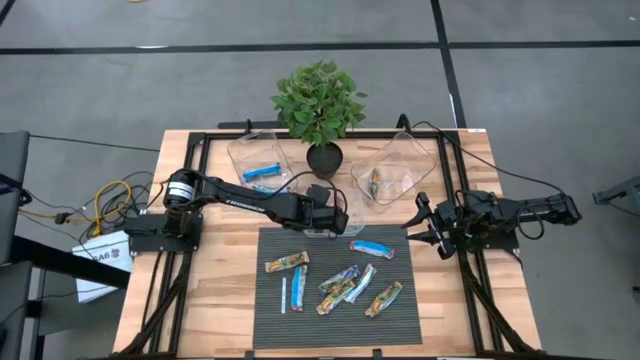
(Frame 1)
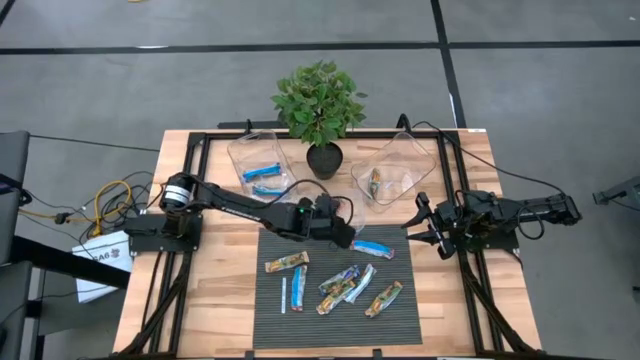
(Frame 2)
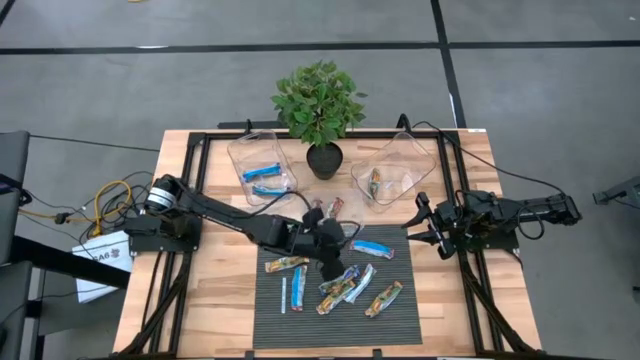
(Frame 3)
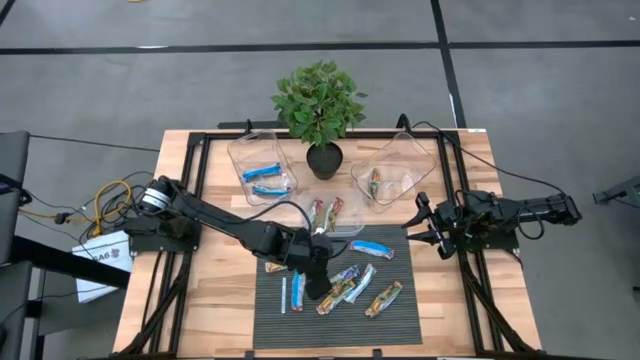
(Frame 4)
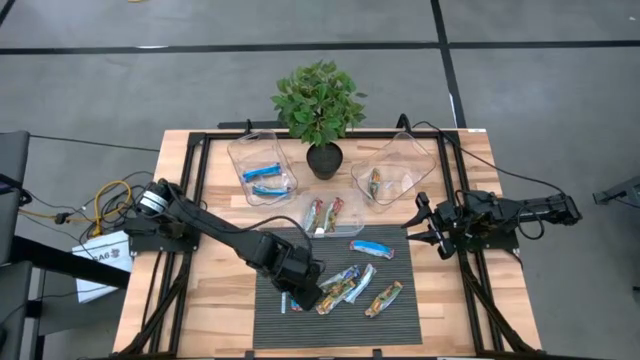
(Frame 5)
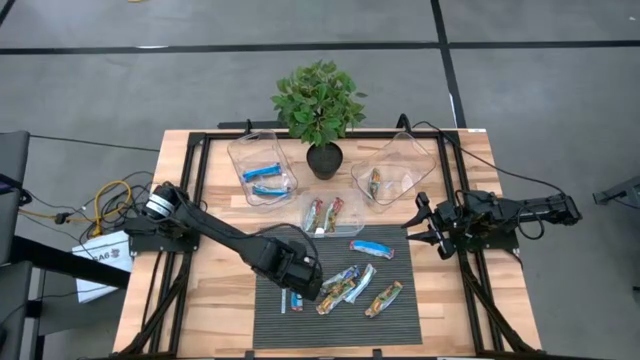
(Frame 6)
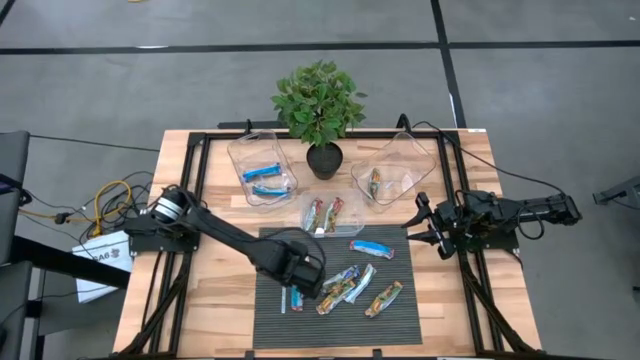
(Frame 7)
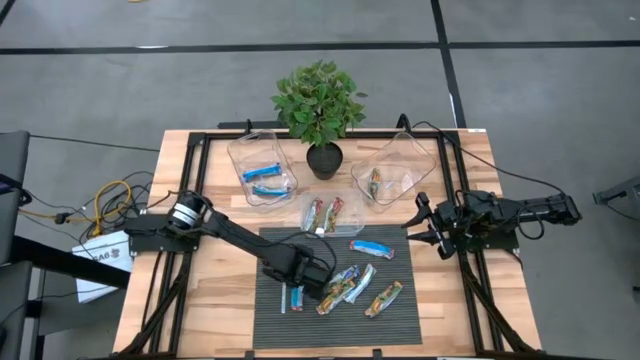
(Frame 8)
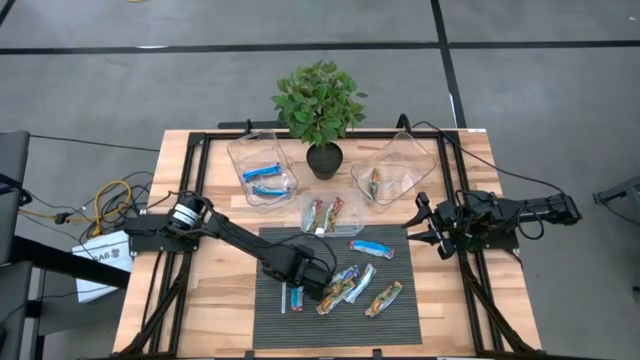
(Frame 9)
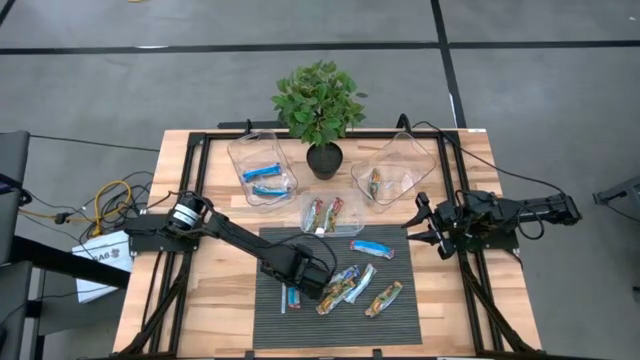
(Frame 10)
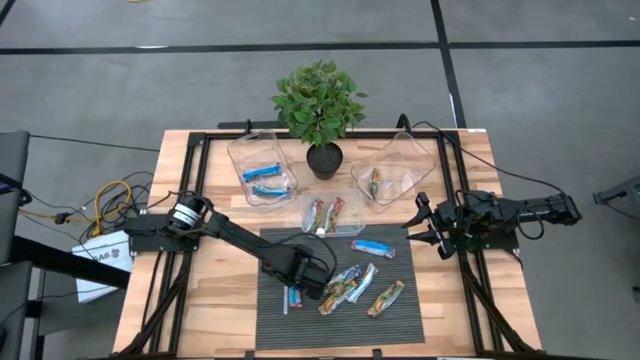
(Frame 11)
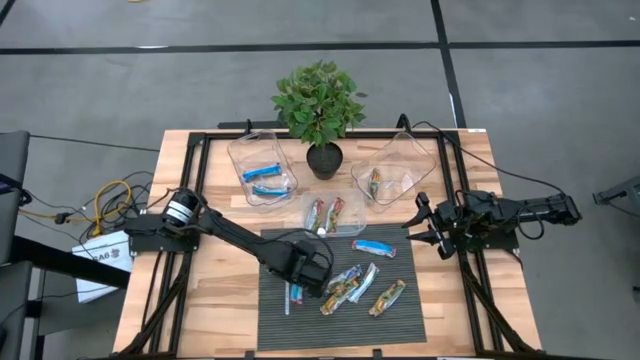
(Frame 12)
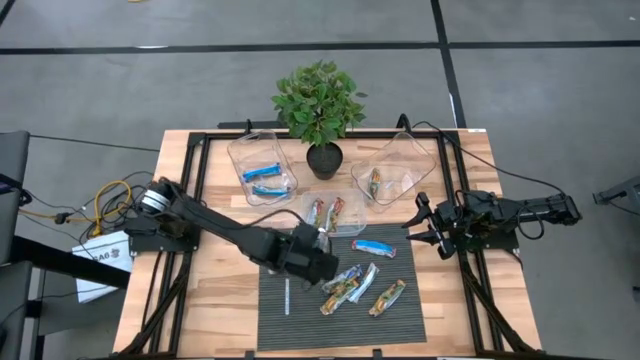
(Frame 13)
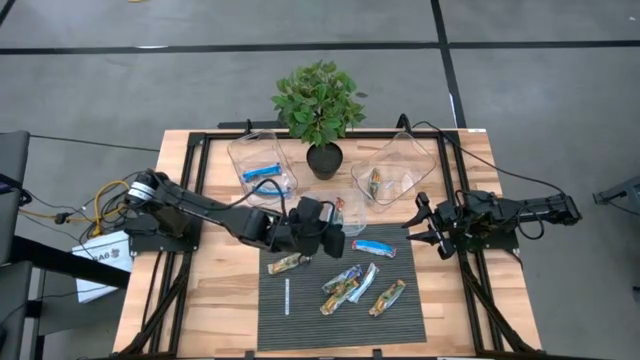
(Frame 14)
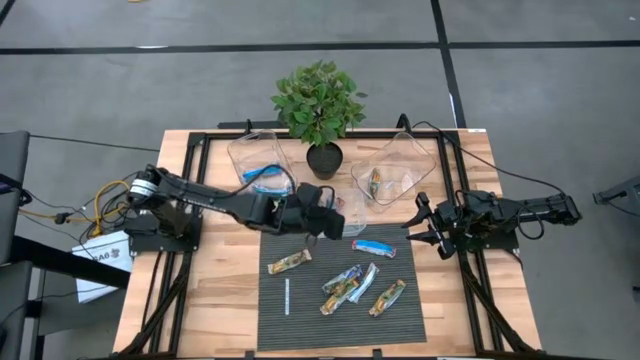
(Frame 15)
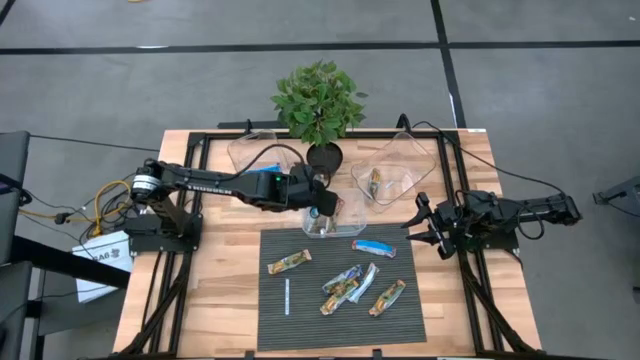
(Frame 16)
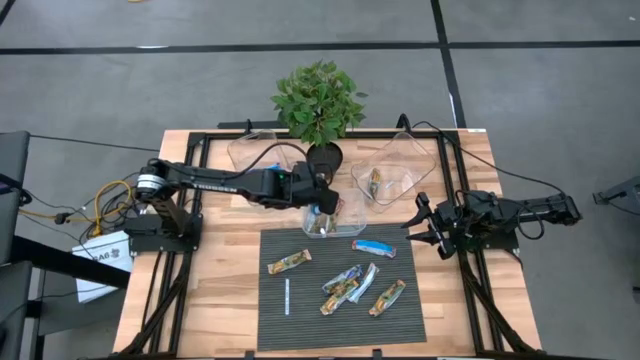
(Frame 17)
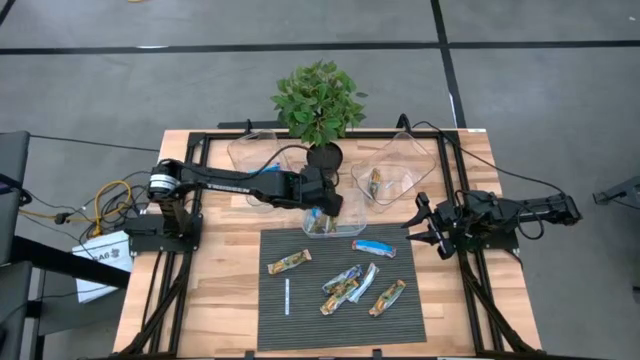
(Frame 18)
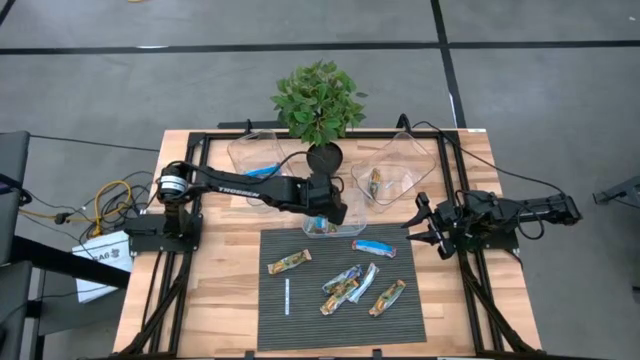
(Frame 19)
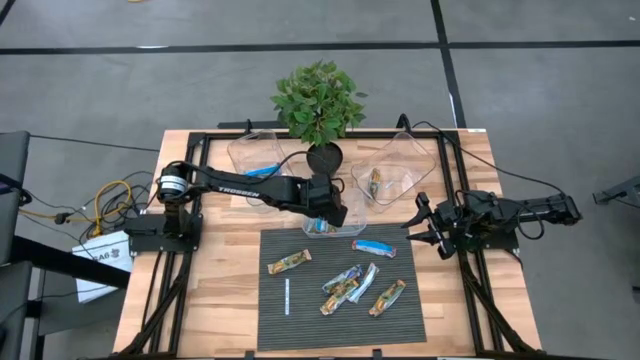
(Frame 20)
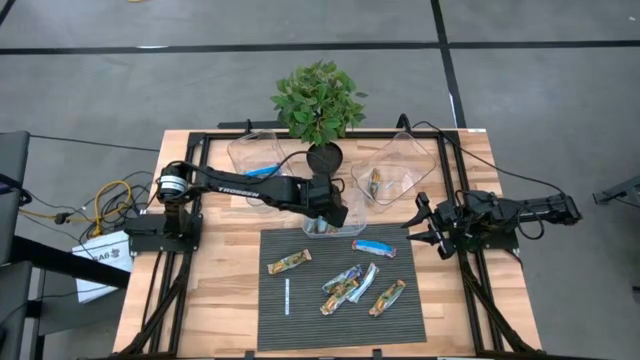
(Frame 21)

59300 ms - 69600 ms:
Task: Pick and place Granola Bars by type
Put the red granola bar into the center transparent bin

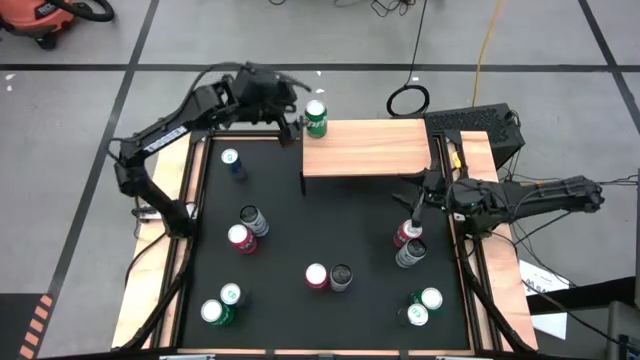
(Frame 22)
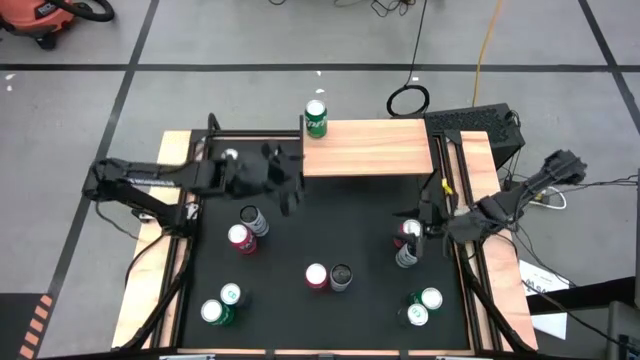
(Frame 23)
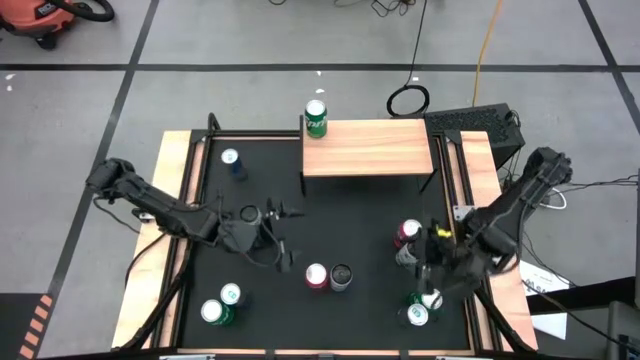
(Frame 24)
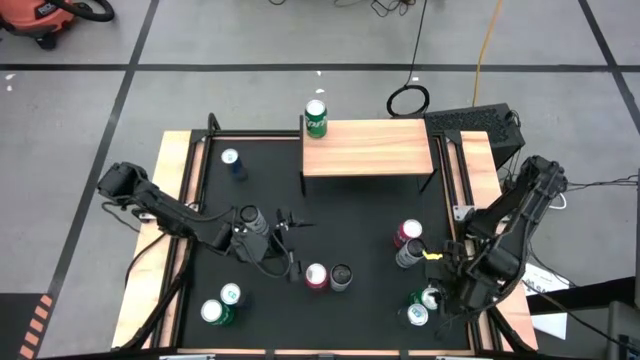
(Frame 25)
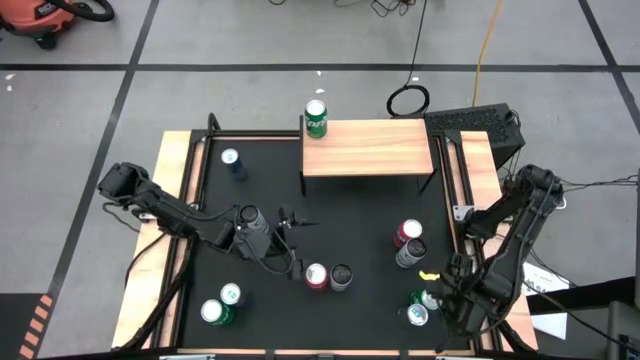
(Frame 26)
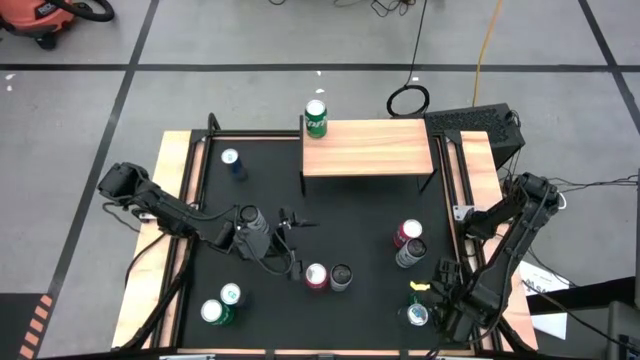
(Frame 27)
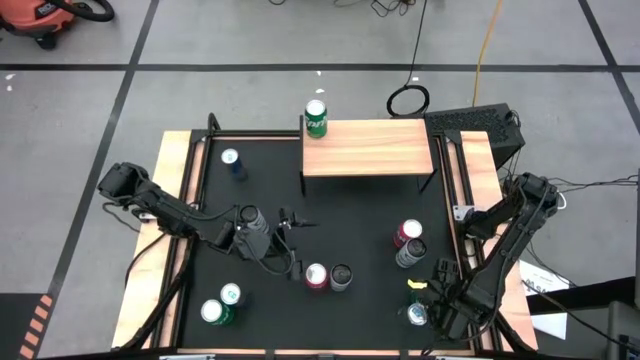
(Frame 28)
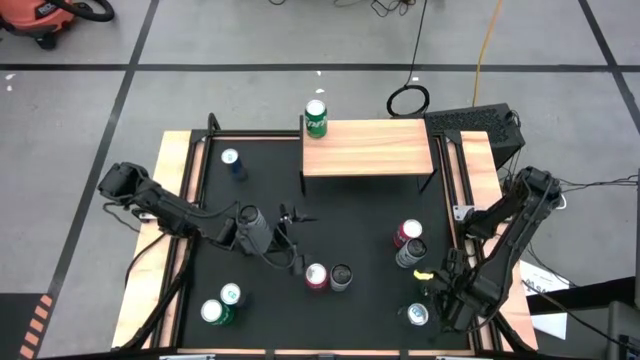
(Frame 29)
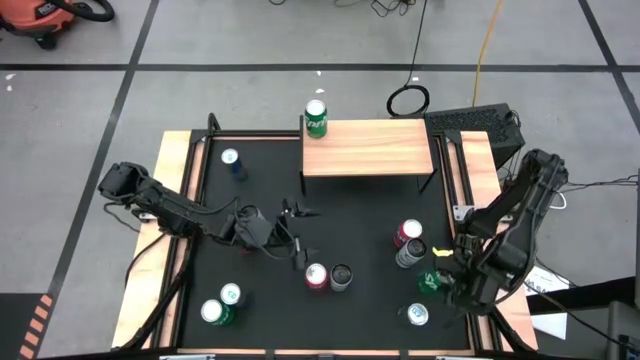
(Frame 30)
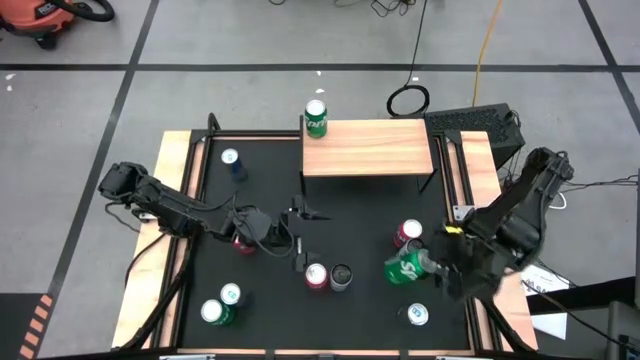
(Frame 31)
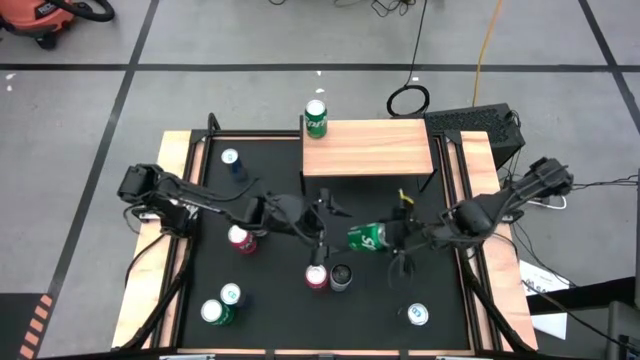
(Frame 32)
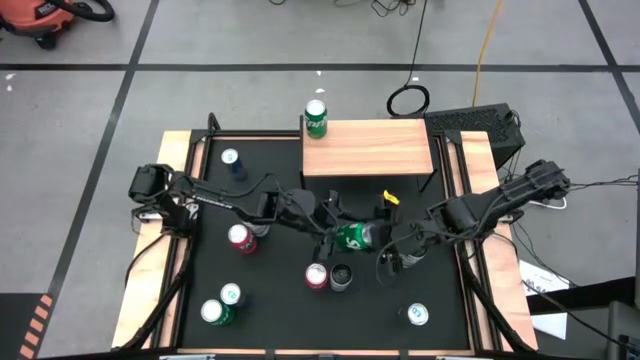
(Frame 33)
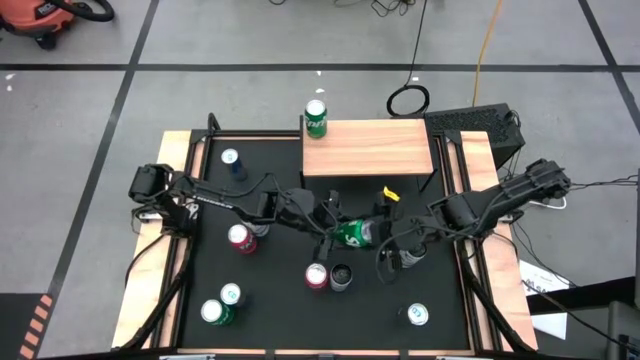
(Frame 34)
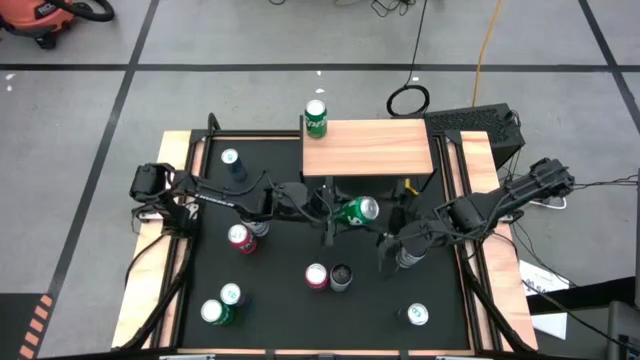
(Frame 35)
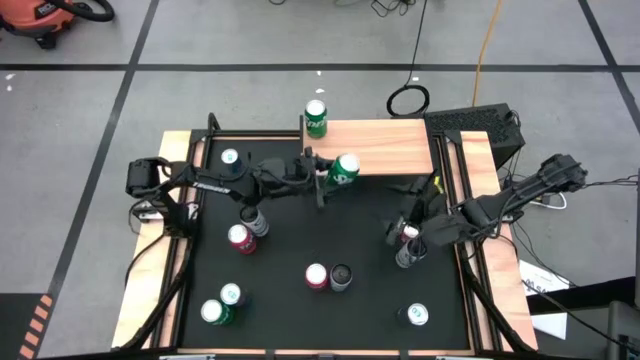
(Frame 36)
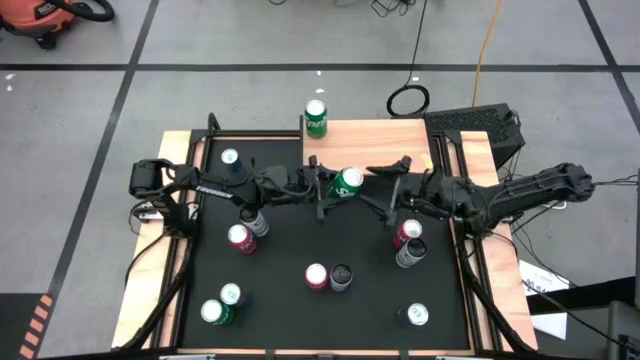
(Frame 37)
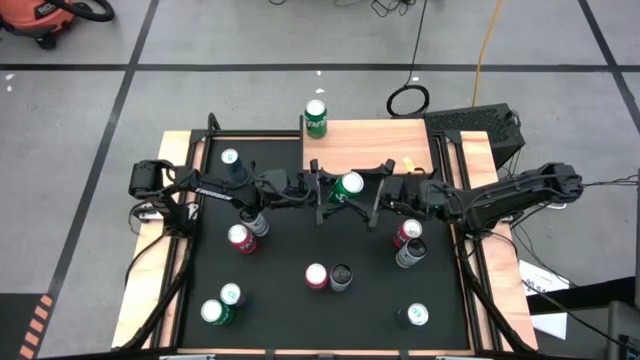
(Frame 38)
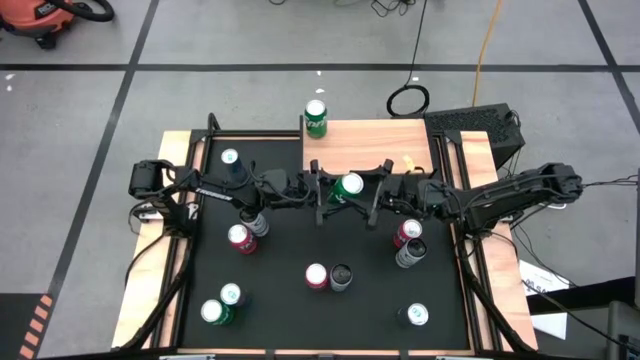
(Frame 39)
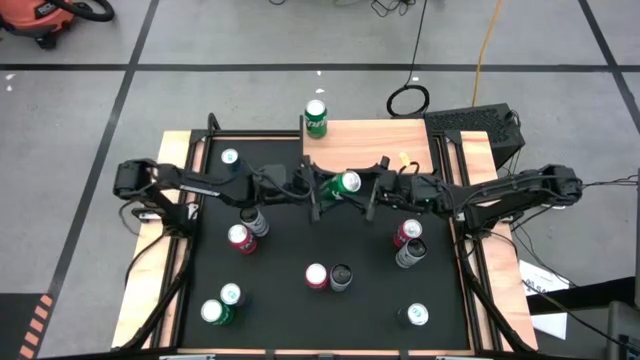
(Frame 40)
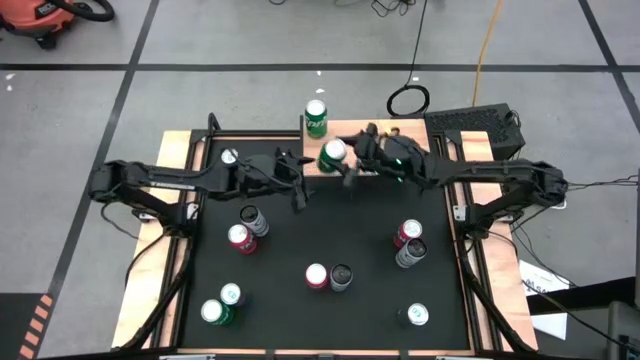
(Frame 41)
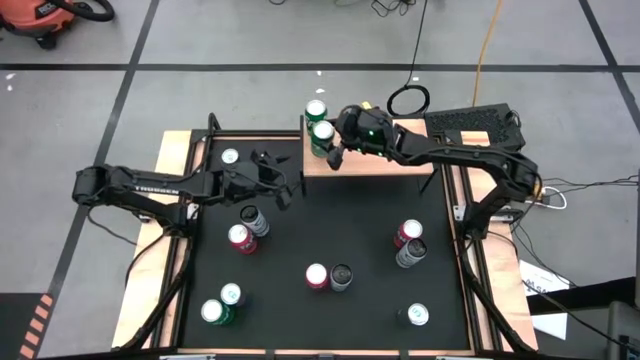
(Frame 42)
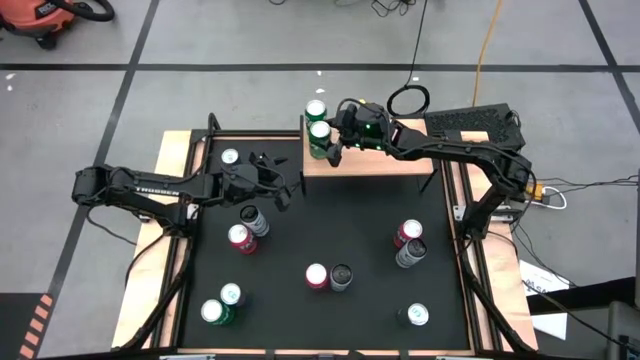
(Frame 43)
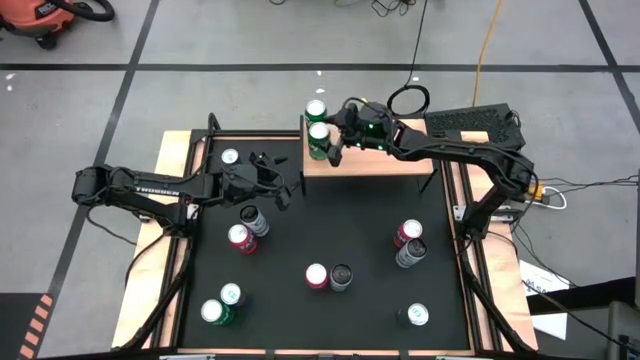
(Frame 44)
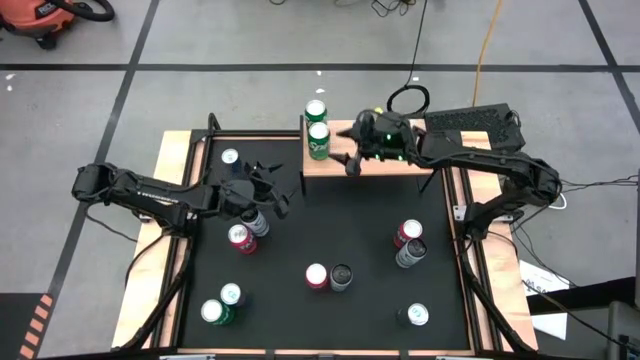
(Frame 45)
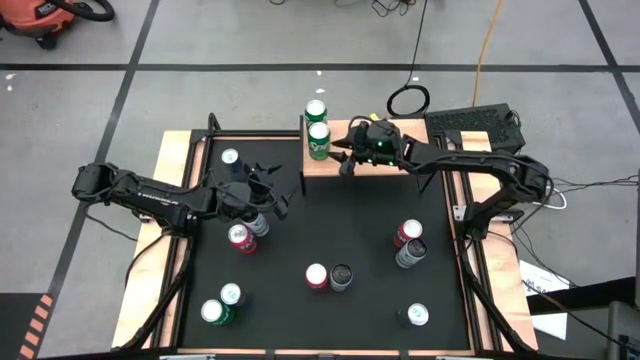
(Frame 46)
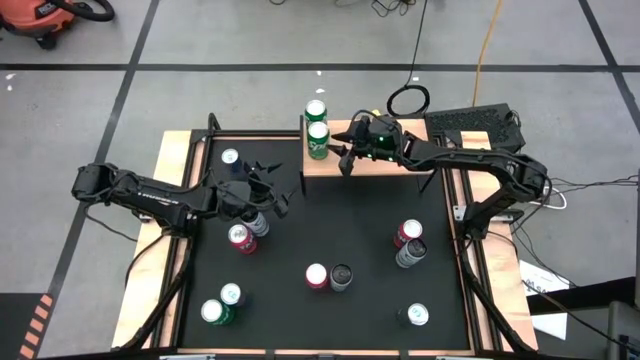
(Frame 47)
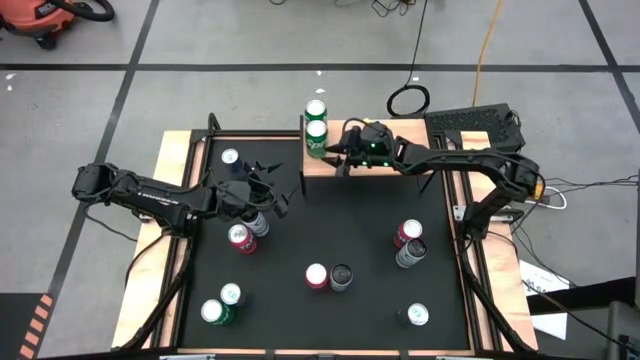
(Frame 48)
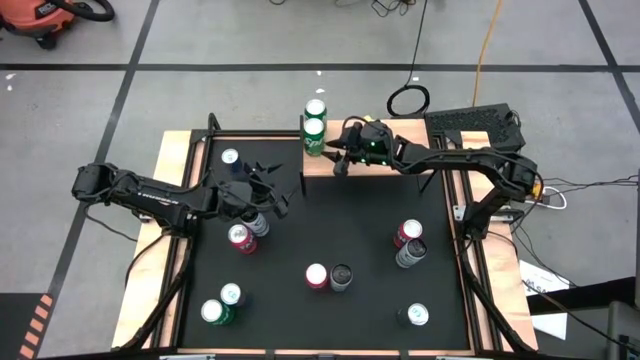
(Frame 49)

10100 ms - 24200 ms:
Task: Place canned beverage on shelf
Put the right green soda can on the shelf
